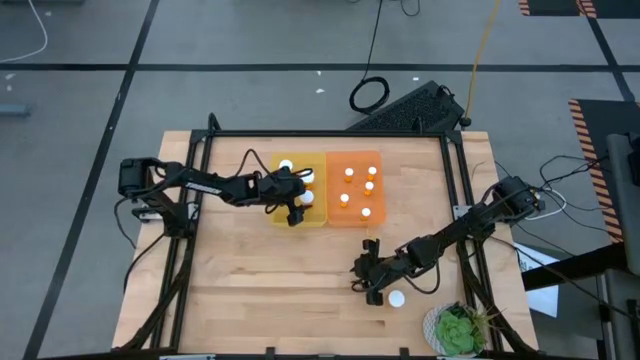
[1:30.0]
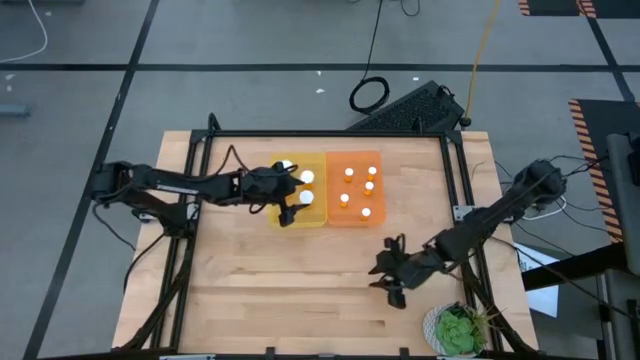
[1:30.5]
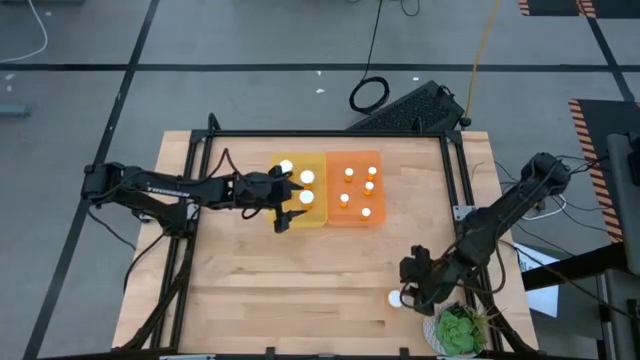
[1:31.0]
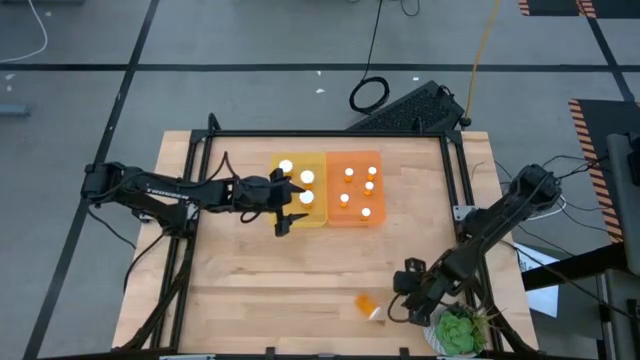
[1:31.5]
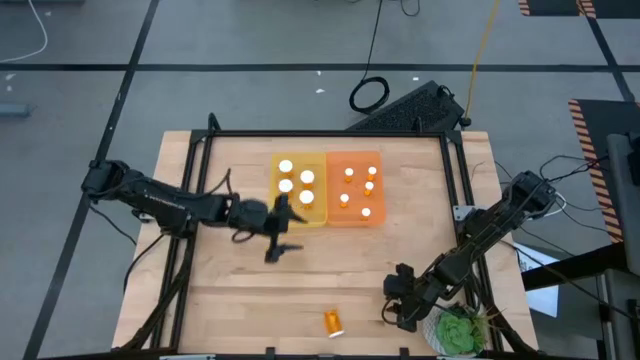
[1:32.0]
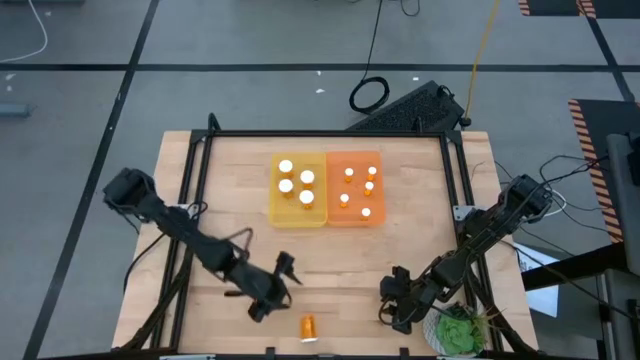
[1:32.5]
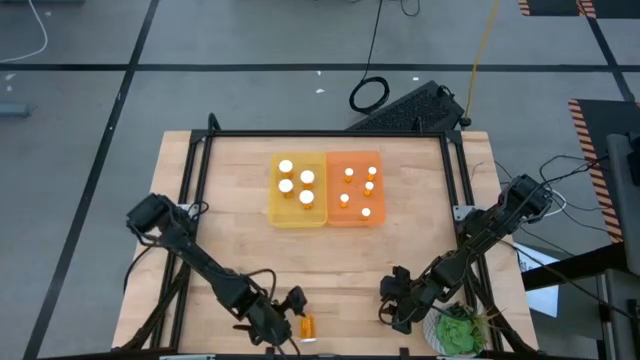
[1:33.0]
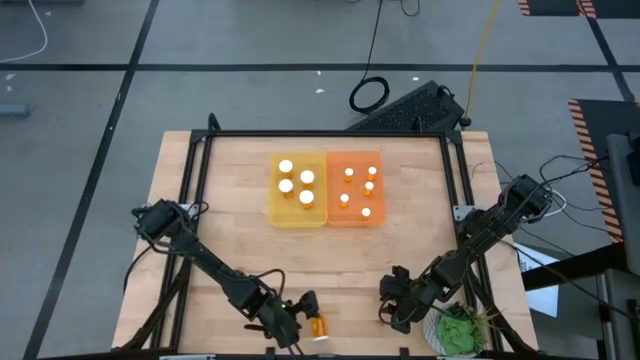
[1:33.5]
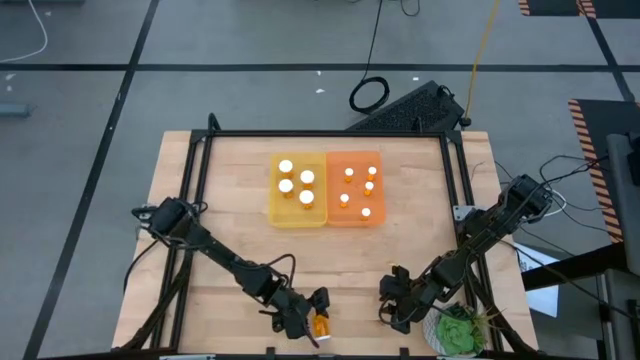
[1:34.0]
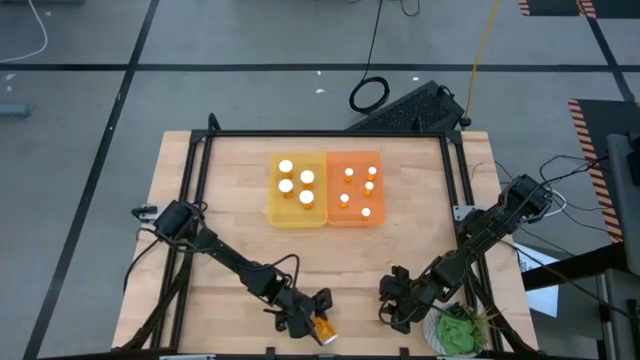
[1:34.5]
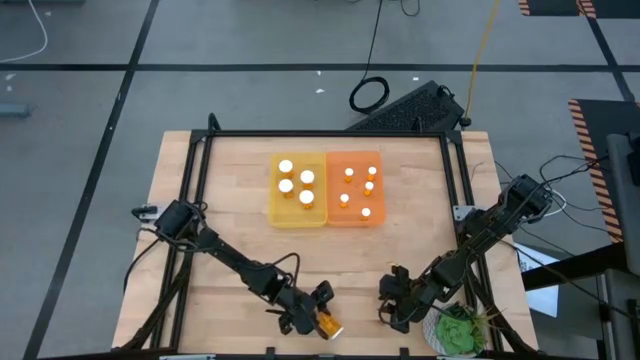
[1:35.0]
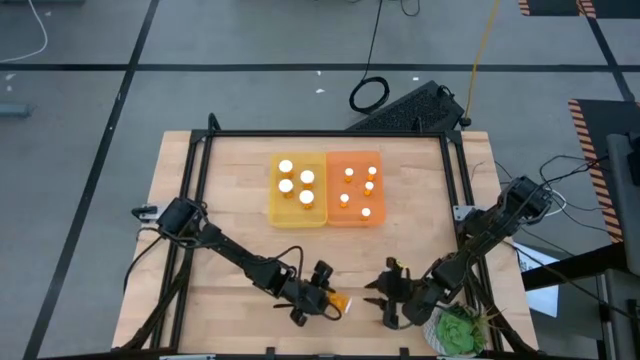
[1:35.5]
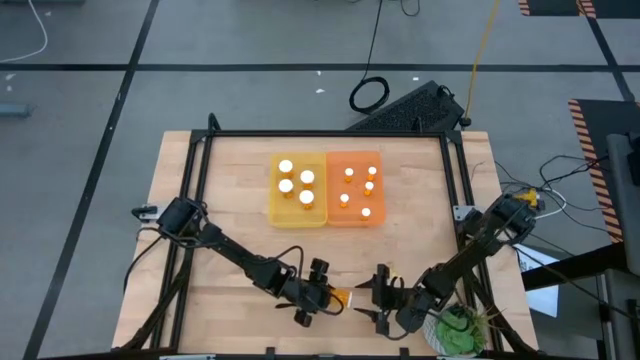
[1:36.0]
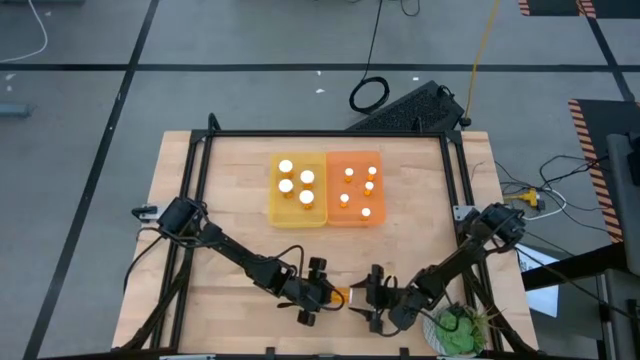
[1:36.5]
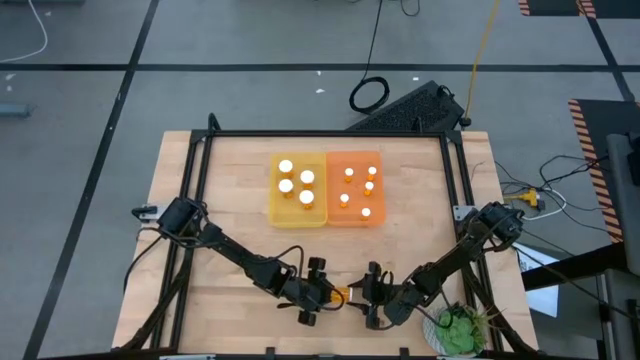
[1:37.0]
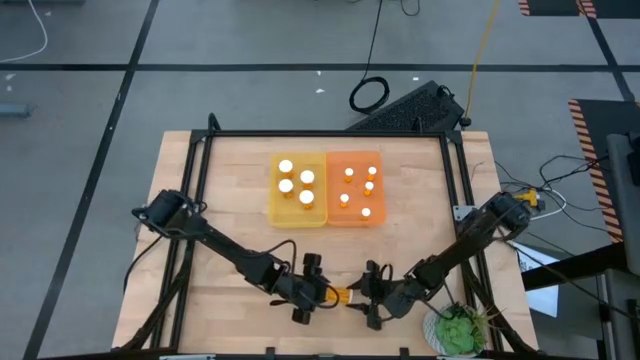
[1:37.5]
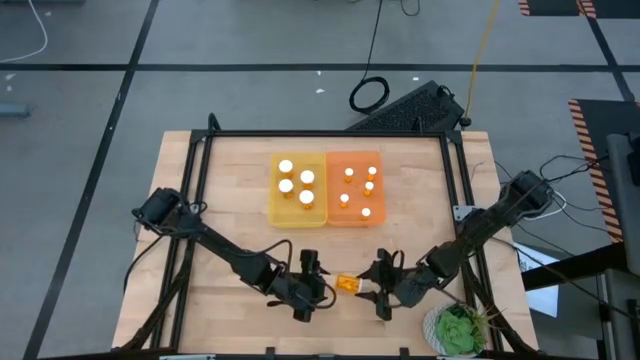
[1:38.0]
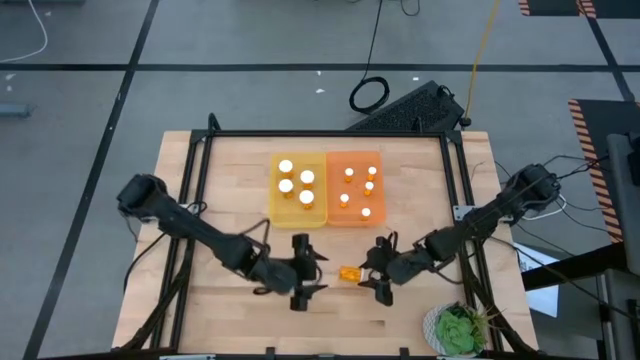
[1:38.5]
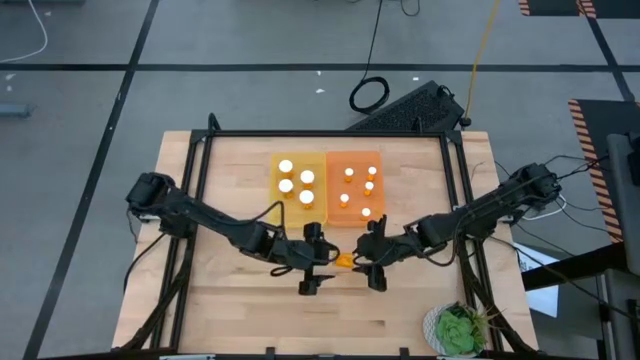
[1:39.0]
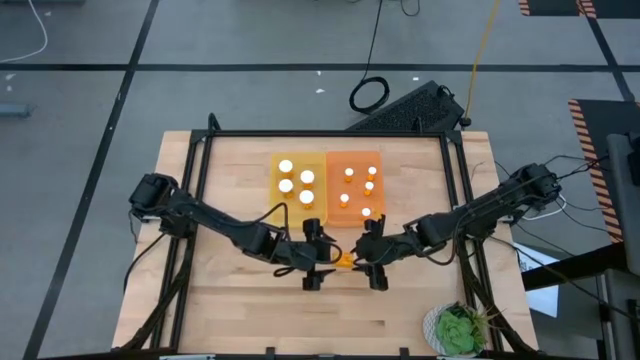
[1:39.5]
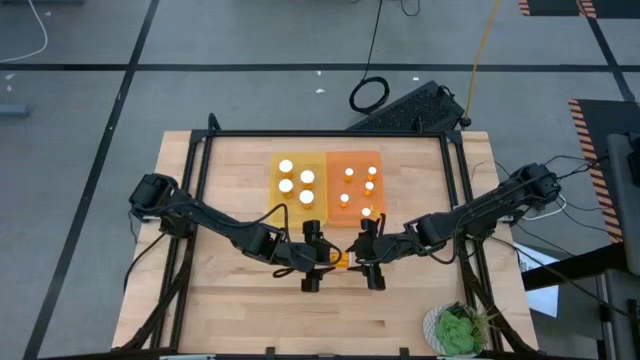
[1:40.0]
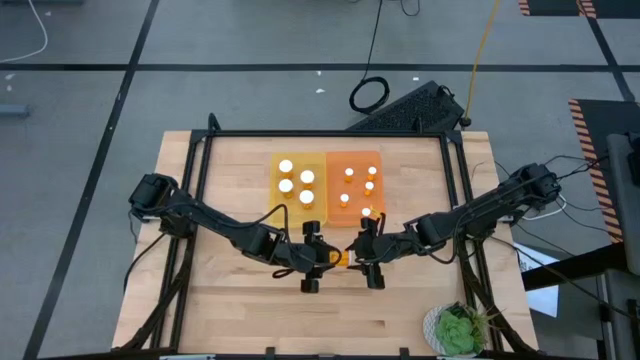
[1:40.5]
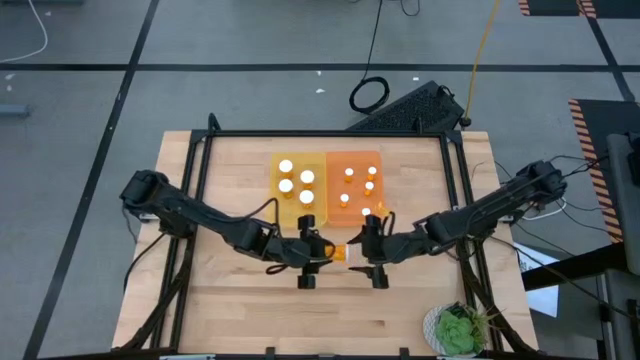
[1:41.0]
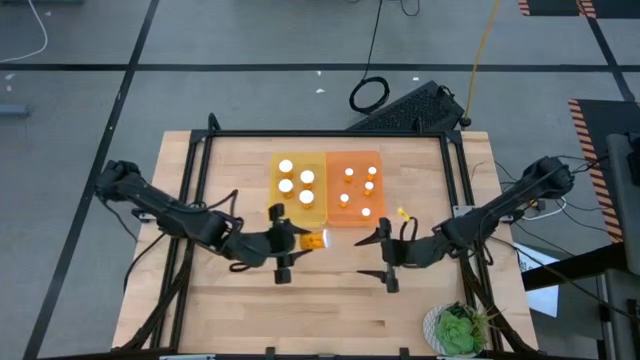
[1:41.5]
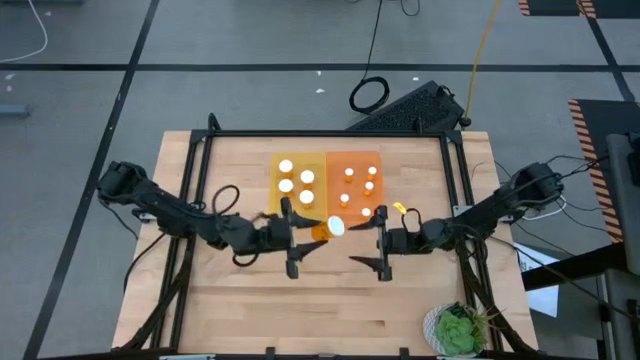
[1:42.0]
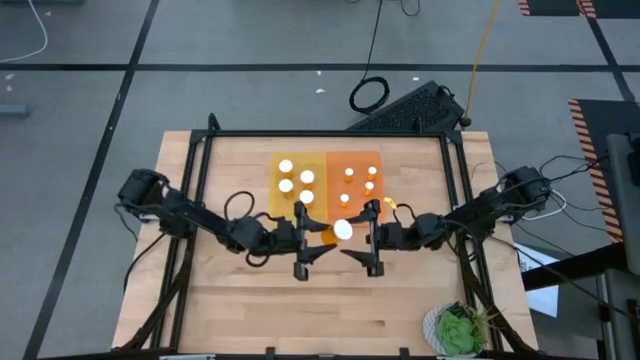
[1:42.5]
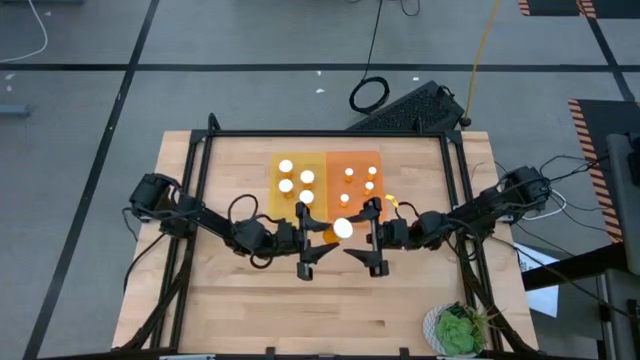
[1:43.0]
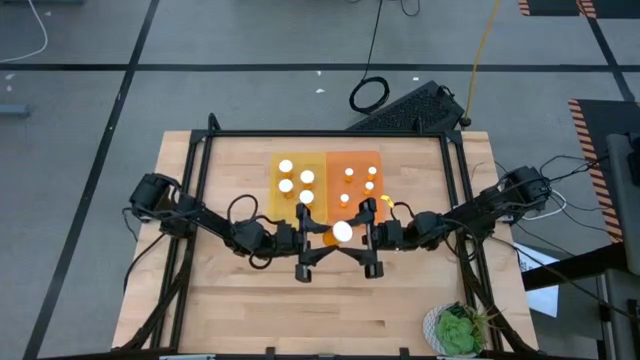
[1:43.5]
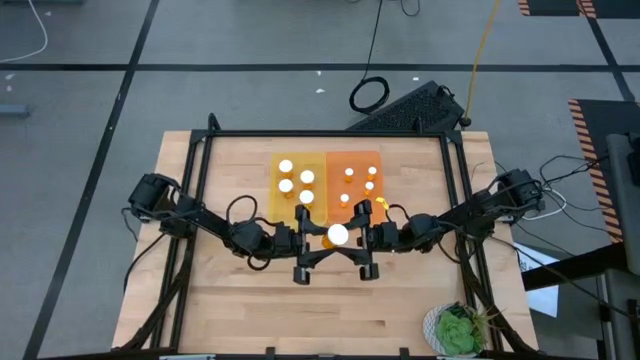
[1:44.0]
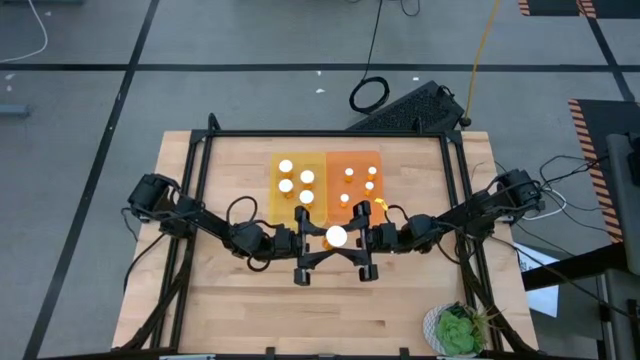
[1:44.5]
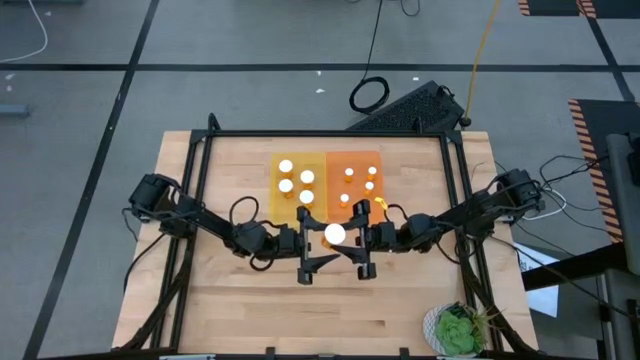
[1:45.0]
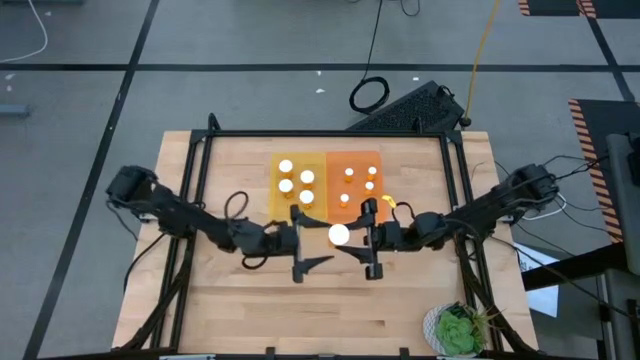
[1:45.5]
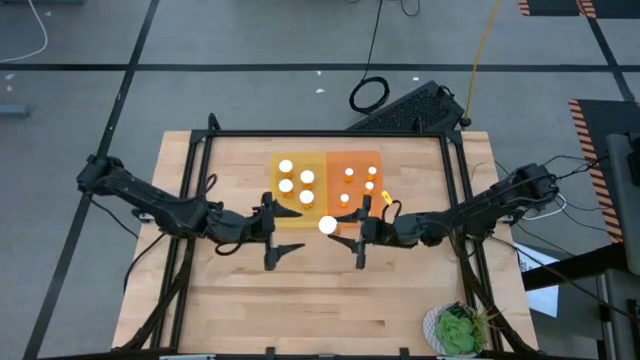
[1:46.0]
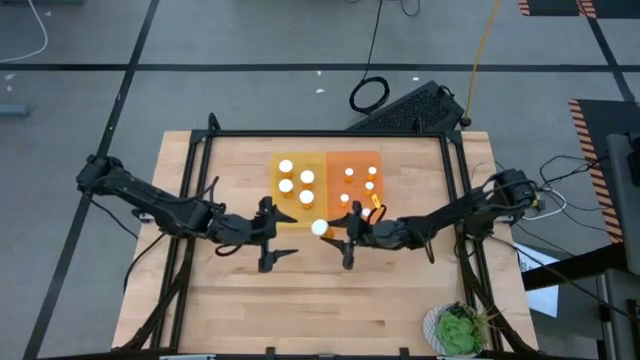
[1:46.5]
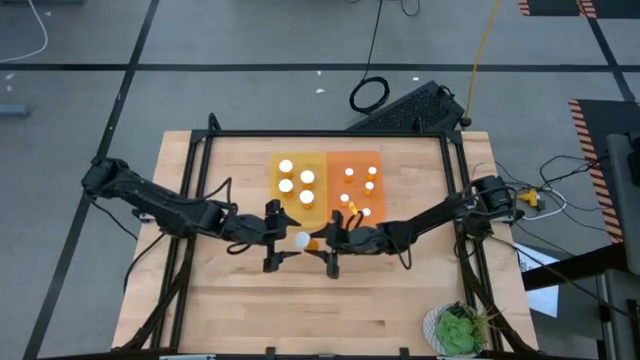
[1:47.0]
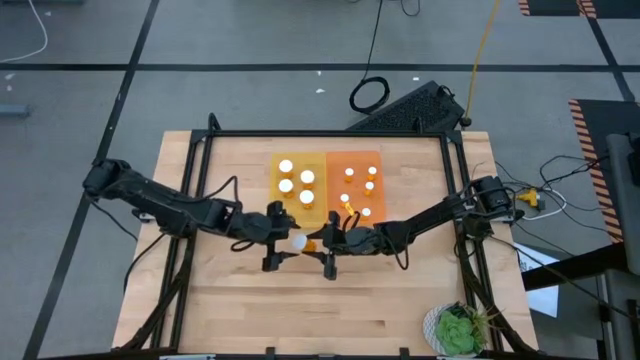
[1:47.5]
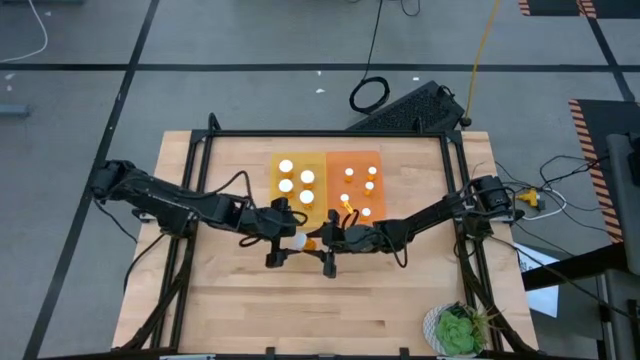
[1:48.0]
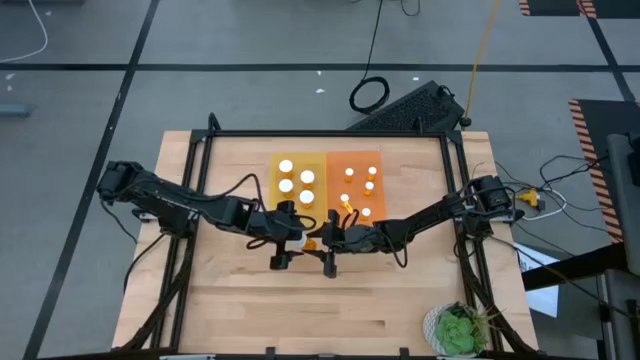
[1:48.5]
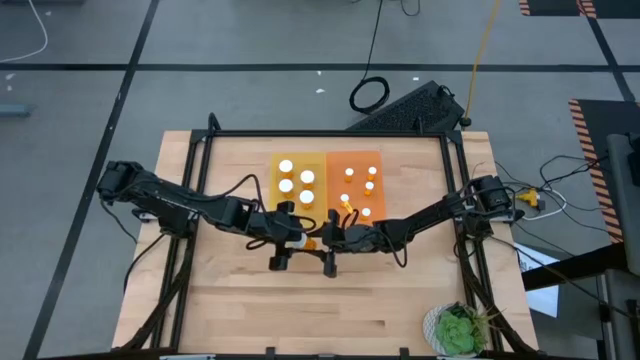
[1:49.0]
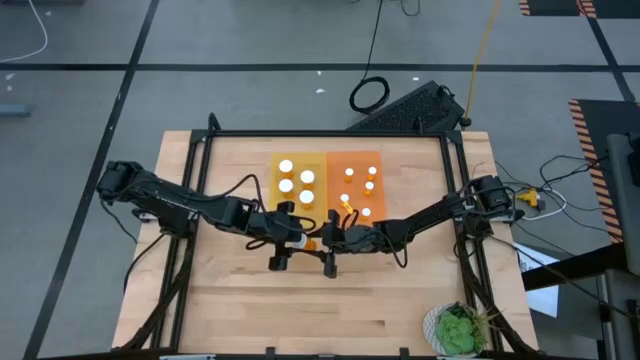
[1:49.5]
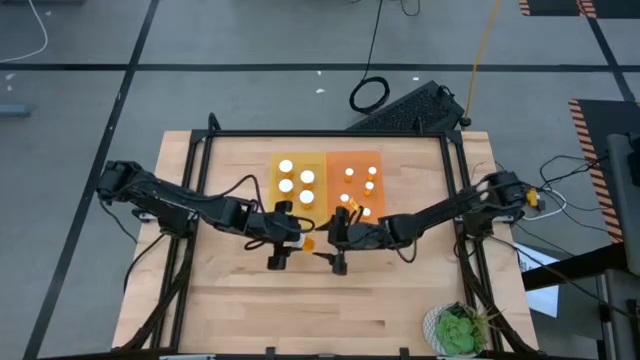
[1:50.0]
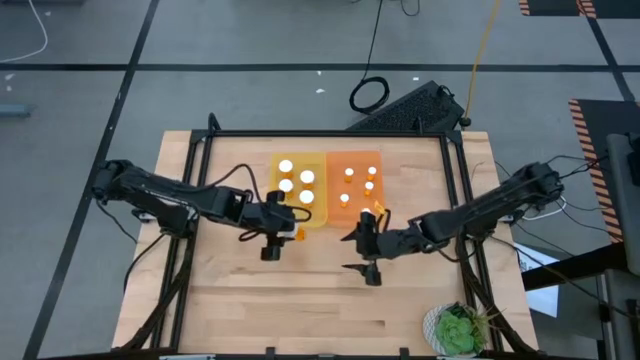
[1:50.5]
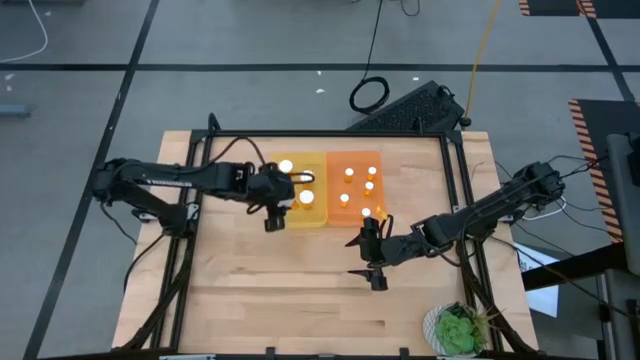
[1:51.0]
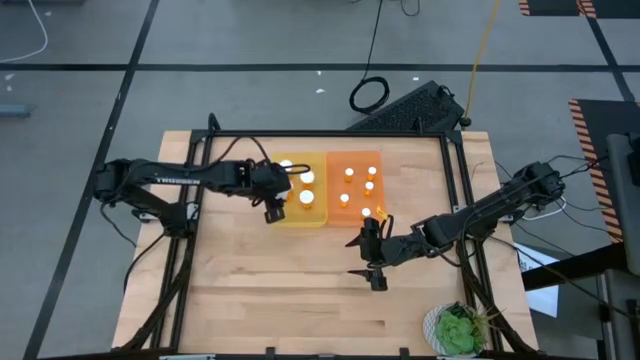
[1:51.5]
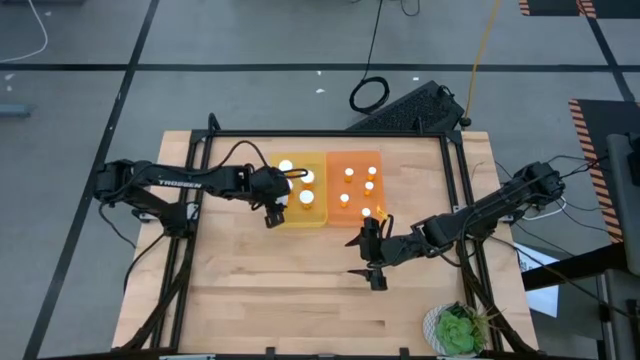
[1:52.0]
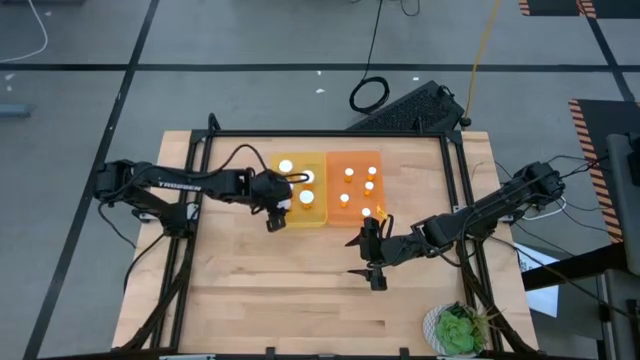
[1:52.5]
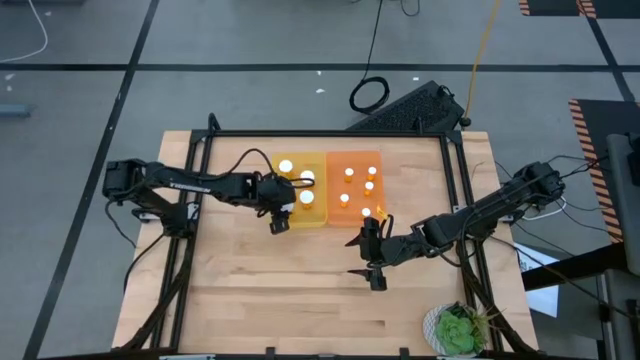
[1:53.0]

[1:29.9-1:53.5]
Task: Pick and place medicine bottles into bin by pill shape (circle, oval)
Put the large orange pill bottle into the yellow bin
